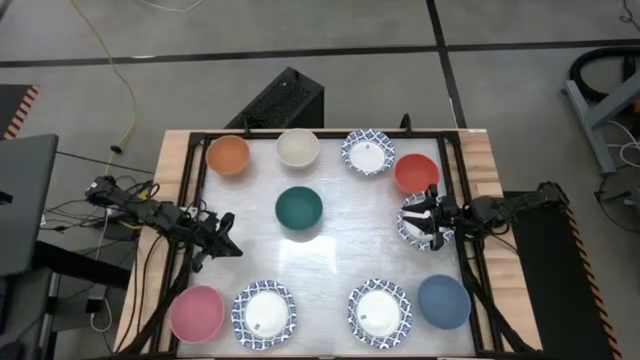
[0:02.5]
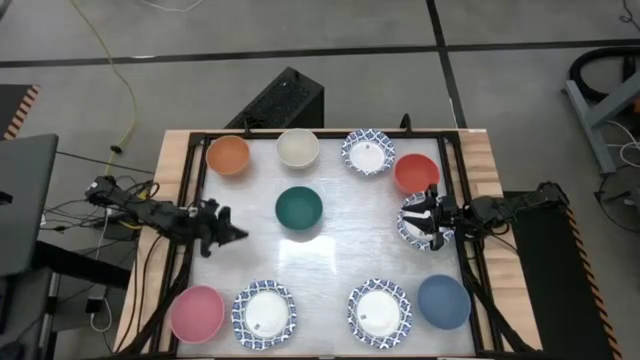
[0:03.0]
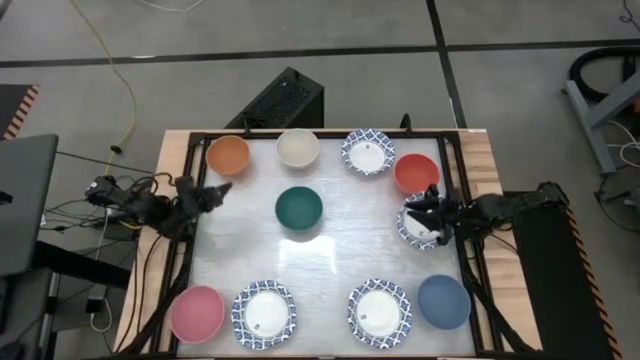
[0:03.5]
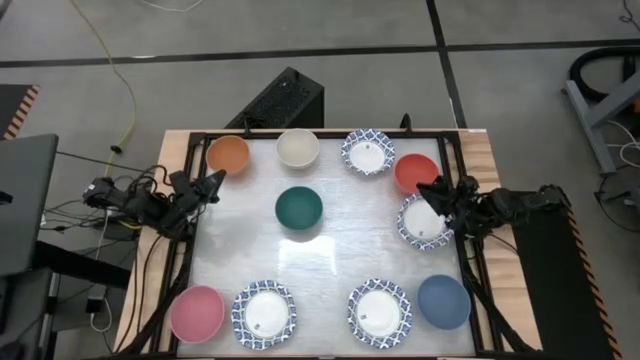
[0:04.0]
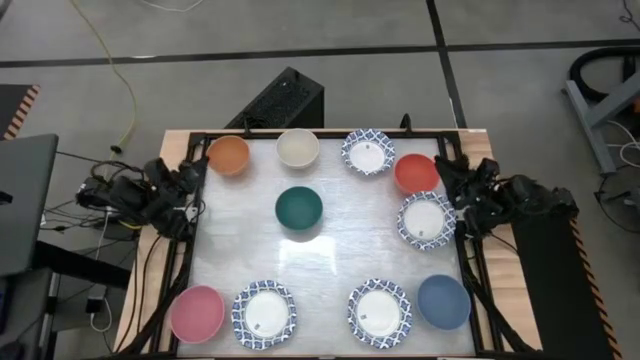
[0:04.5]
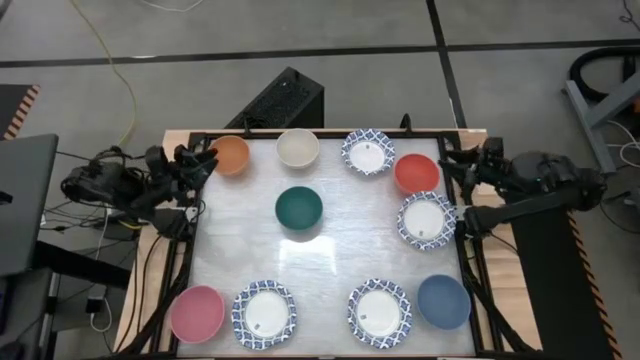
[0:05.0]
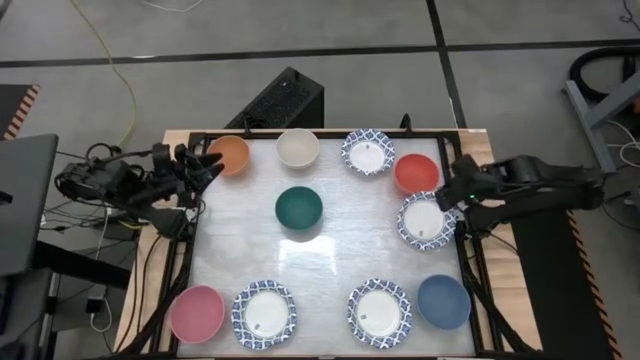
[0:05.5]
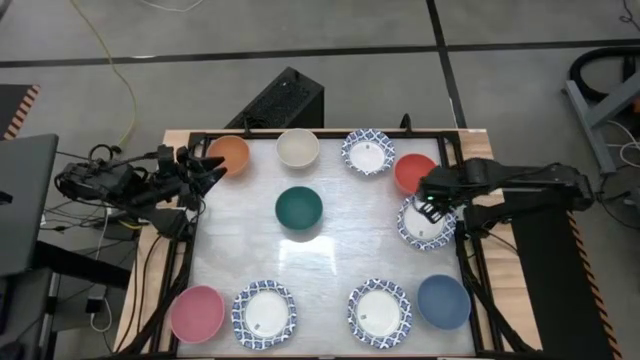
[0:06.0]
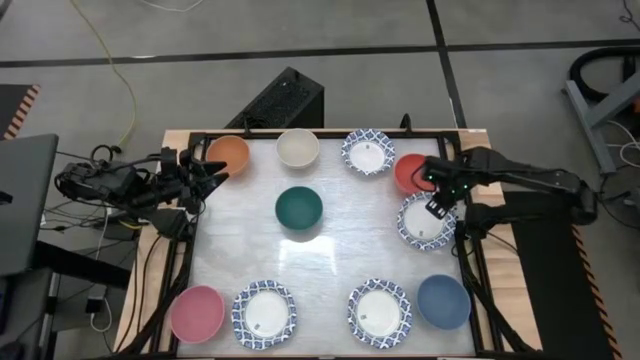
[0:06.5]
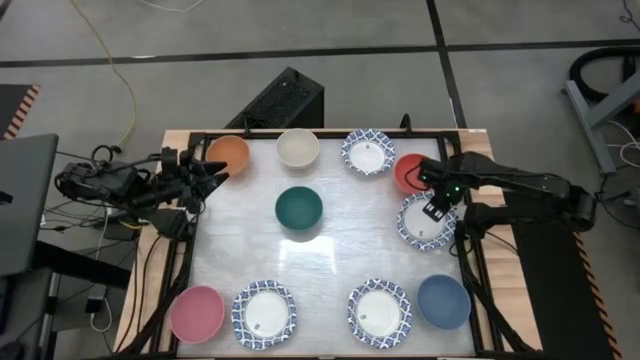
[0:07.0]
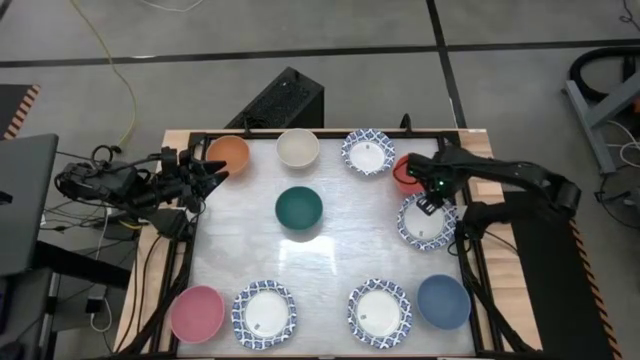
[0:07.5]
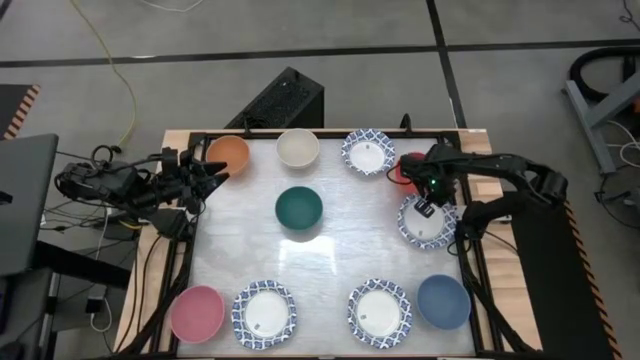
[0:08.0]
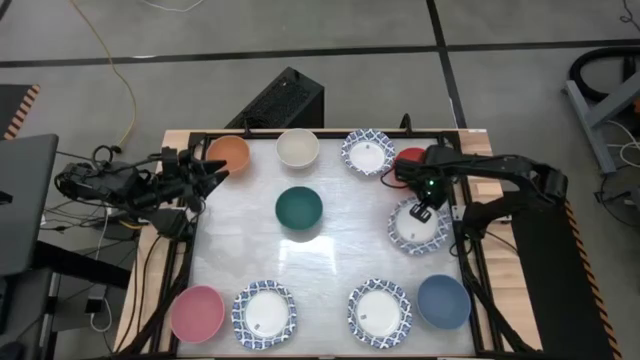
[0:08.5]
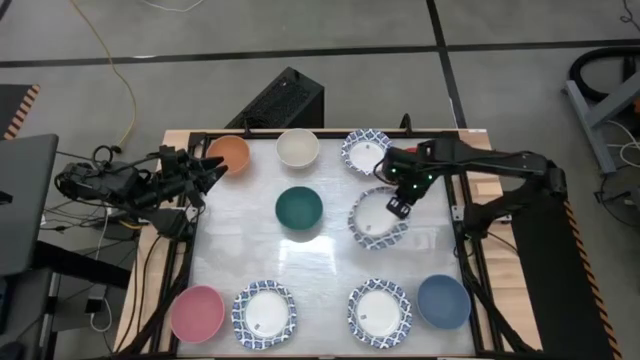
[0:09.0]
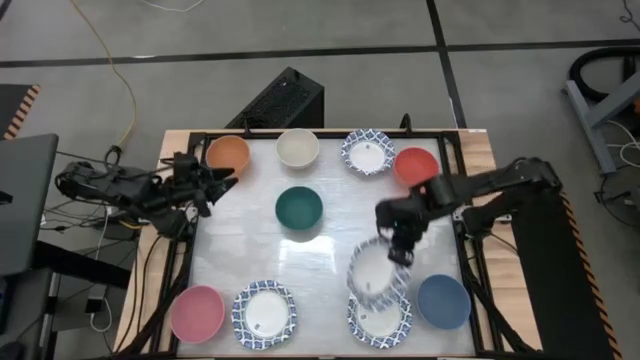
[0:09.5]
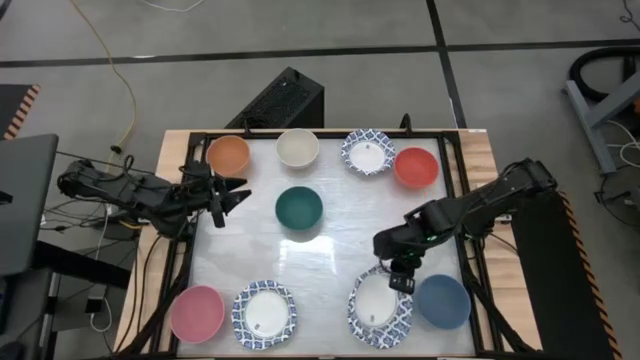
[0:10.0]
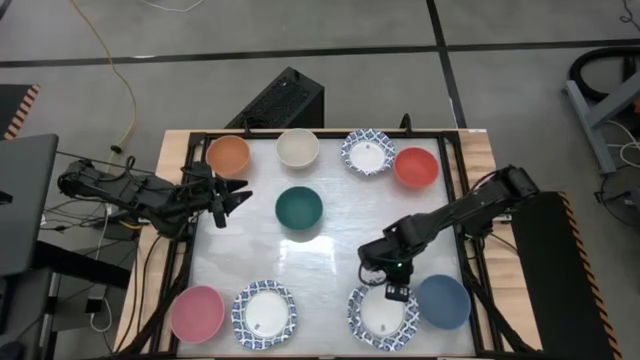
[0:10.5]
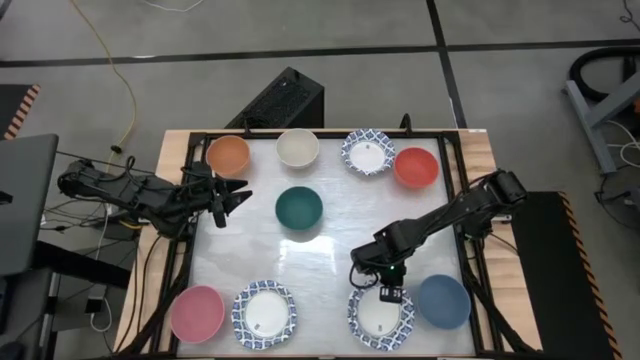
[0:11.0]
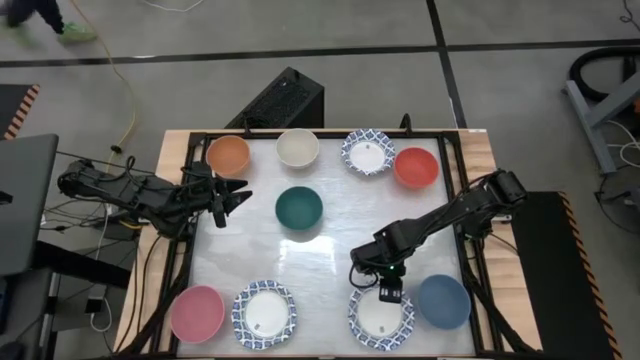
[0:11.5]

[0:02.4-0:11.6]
Stack the middle right blue patterned bowl on top of the bottom right blue patterned bowl

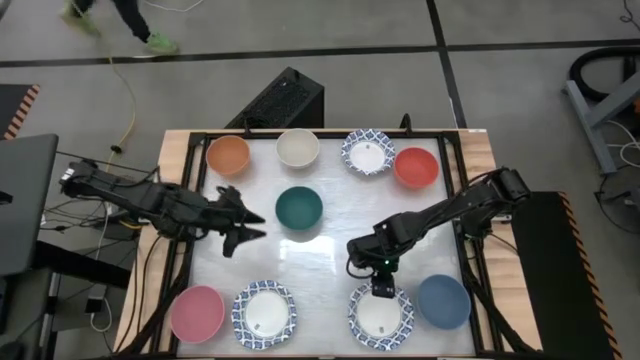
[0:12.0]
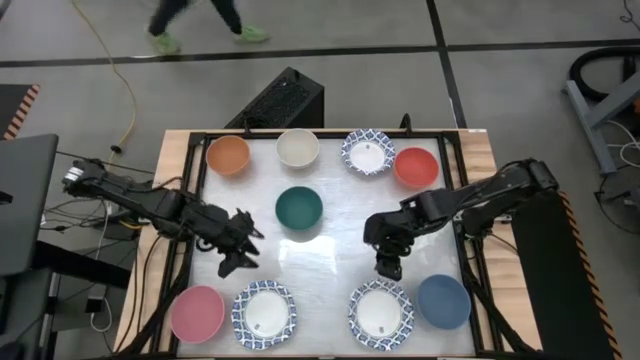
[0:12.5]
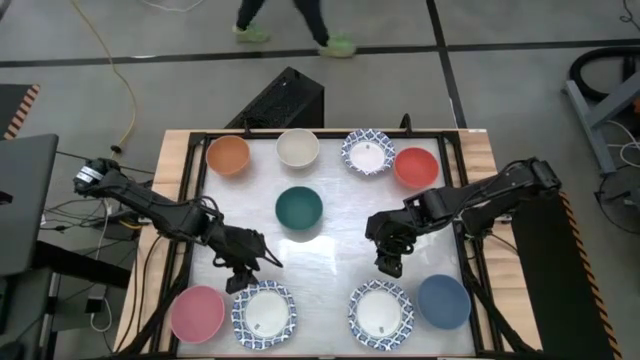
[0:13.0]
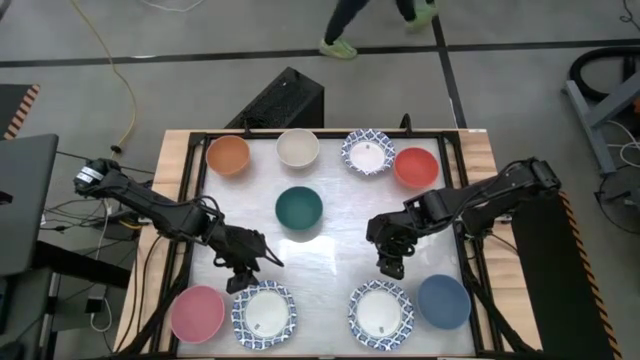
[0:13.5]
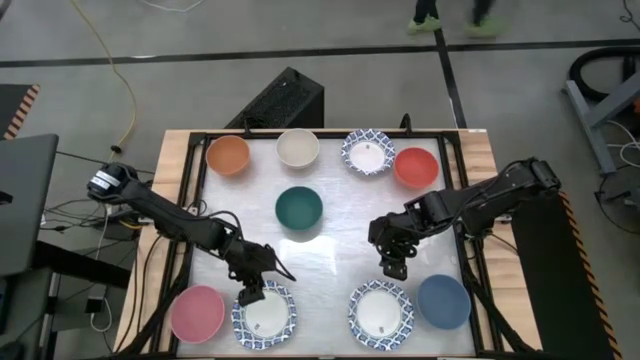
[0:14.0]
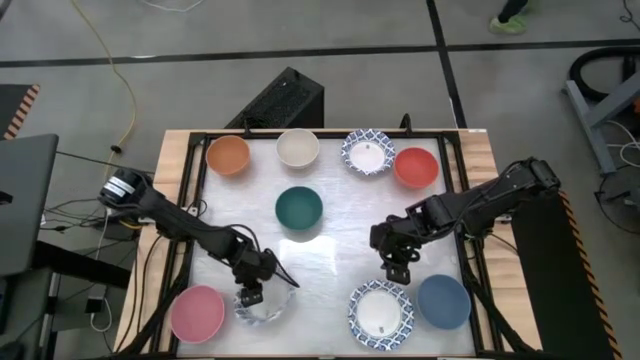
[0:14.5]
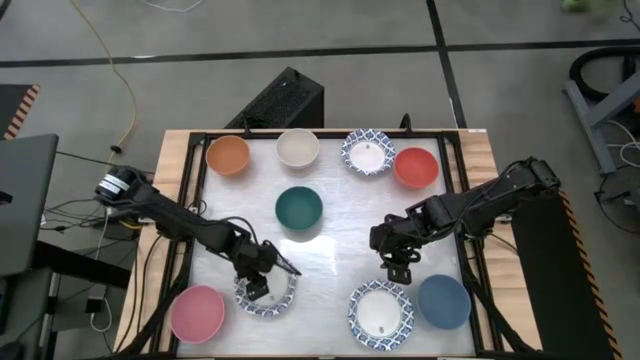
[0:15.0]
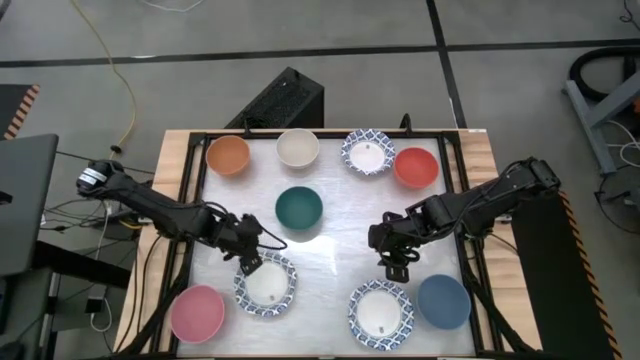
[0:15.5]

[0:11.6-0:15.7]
Stack the bottom left blue patterned bowl on top of the bottom right blue patterned bowl

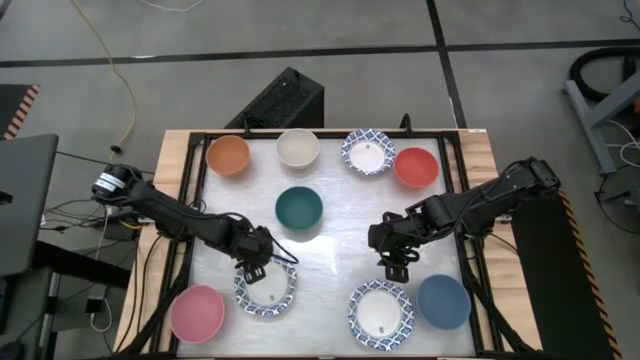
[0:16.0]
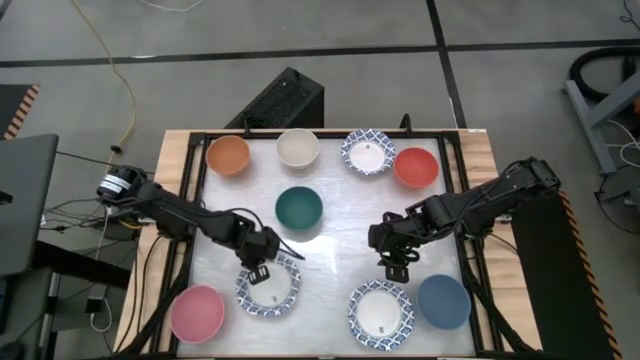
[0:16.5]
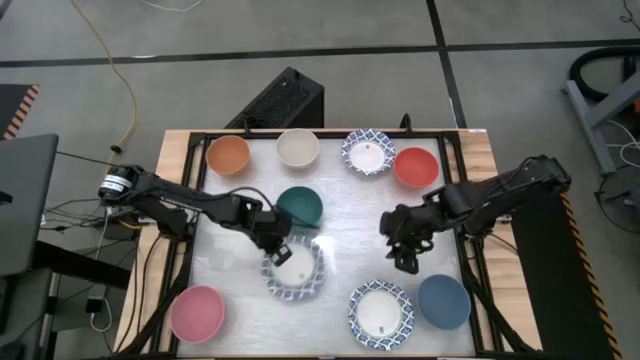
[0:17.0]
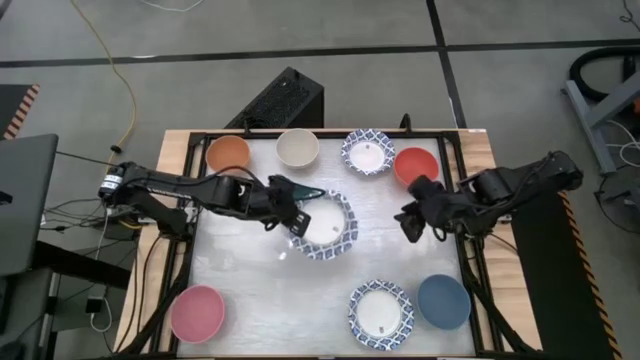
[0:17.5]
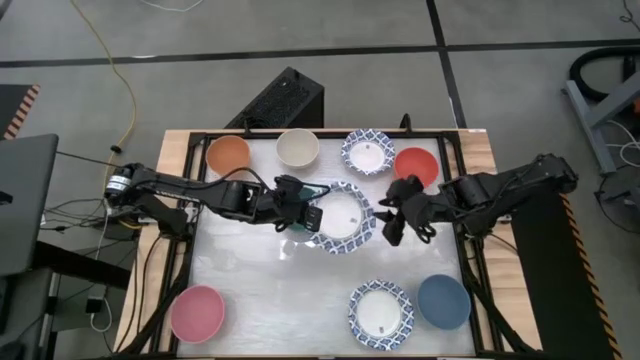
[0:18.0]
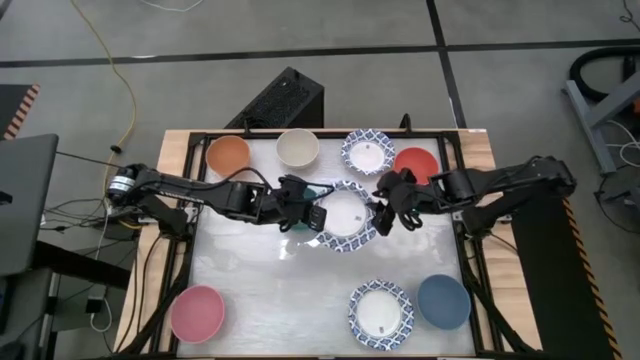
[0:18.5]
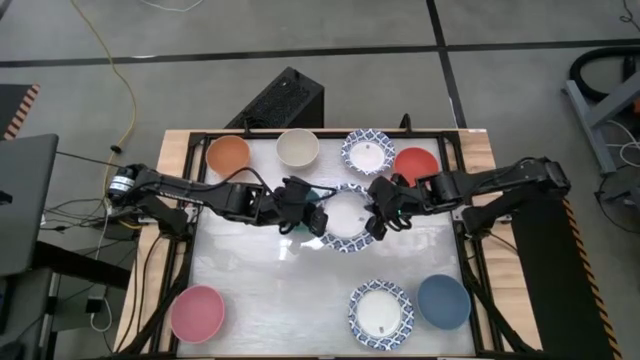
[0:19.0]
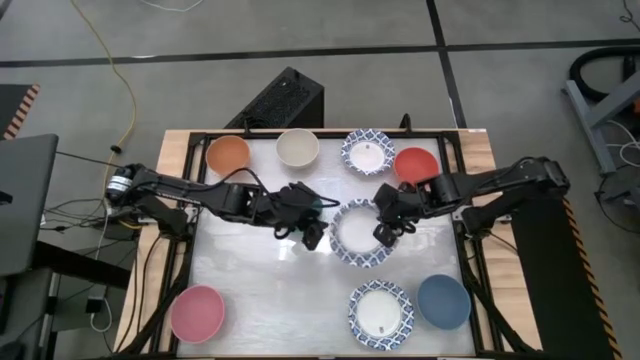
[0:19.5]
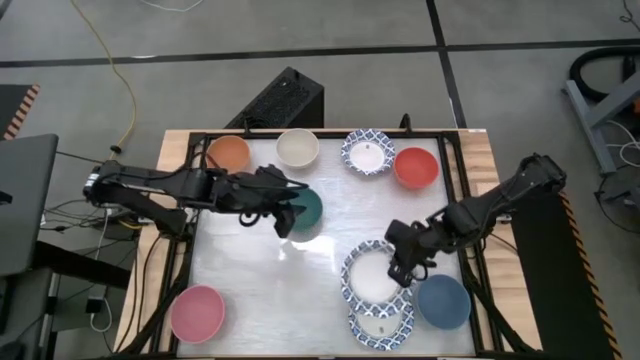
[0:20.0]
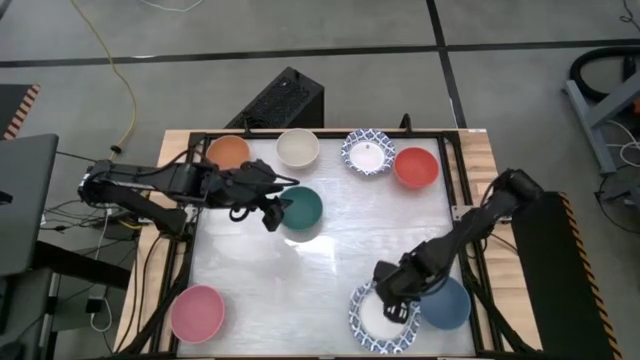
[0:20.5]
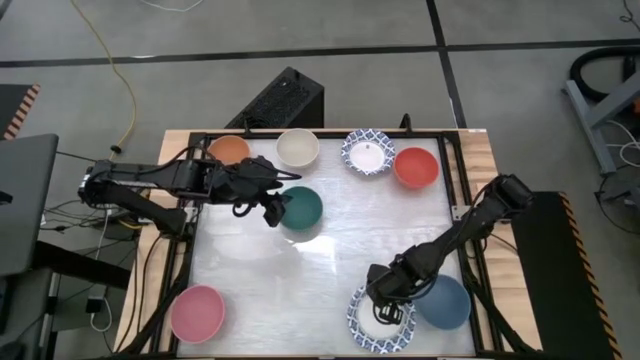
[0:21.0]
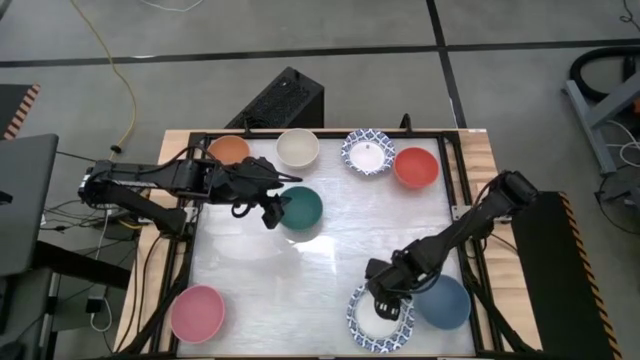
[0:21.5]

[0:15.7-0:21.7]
Stack the bottom left blue patterned bowl on top of the bottom right blue patterned bowl
